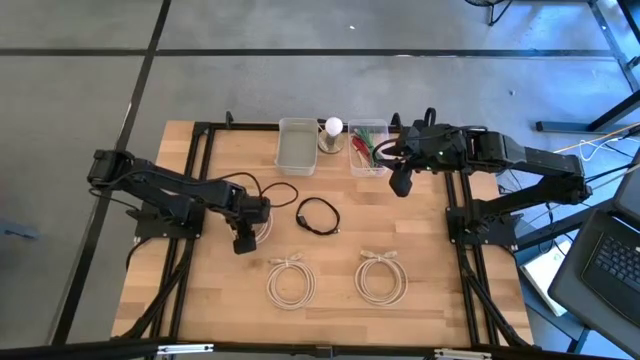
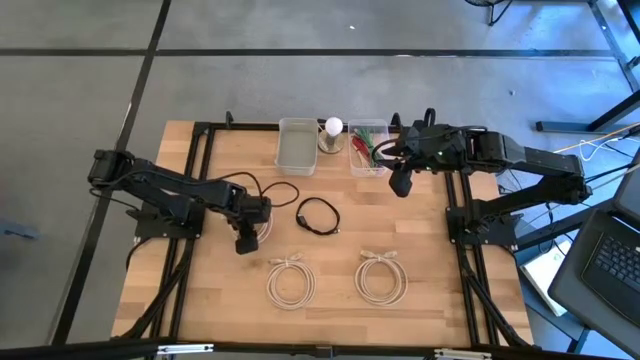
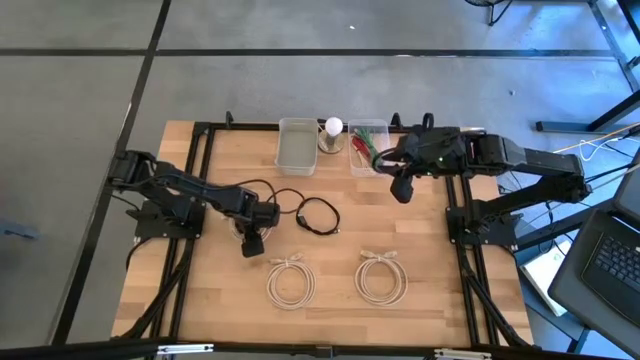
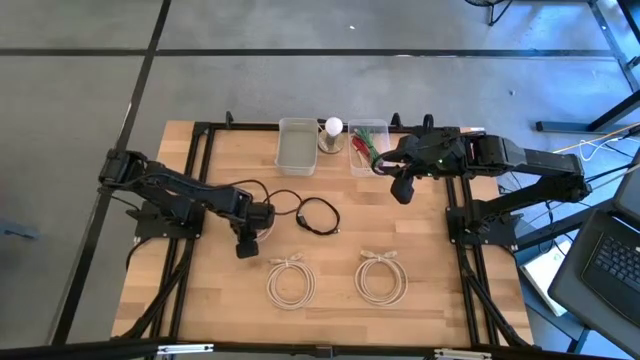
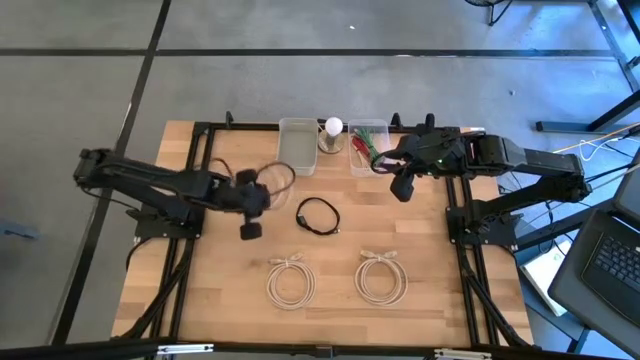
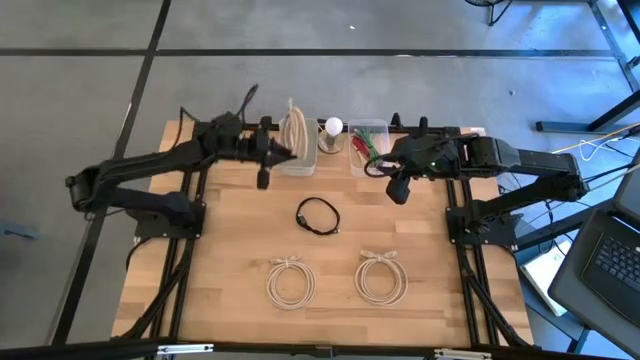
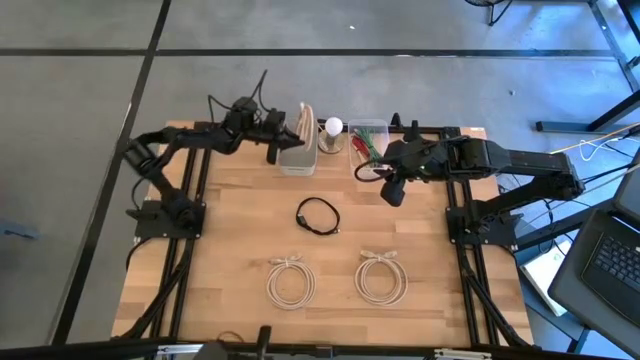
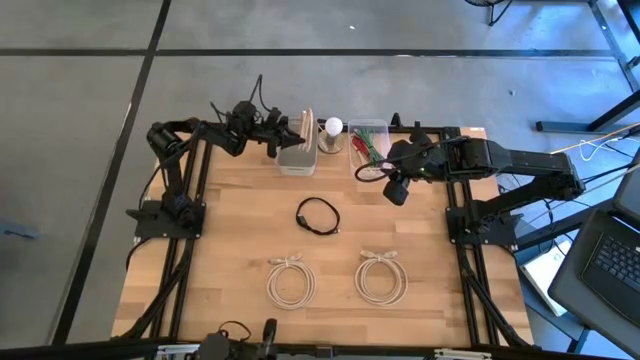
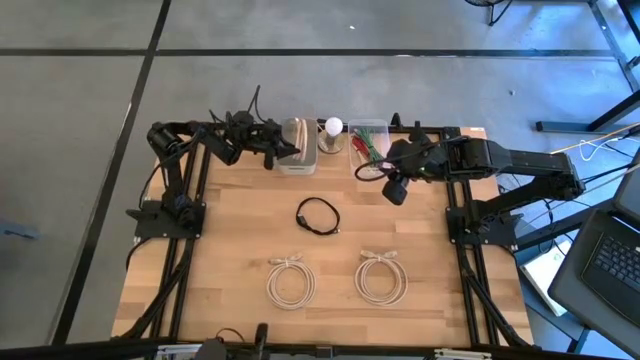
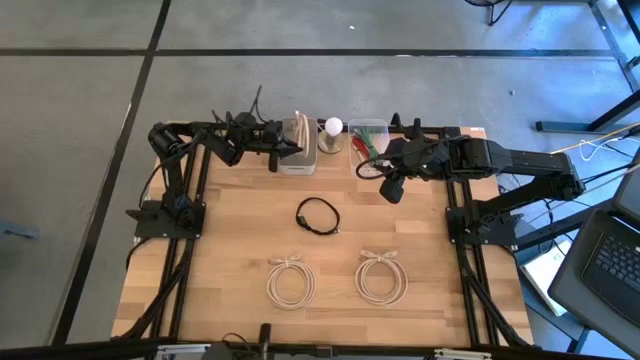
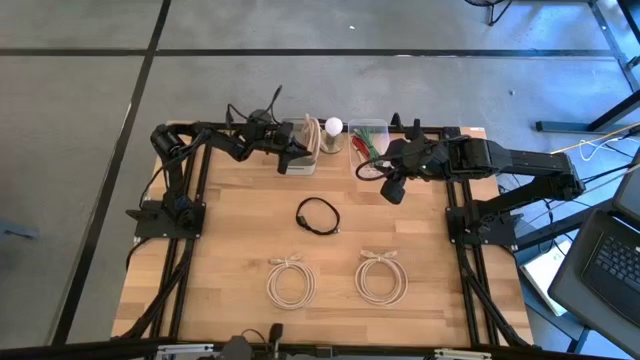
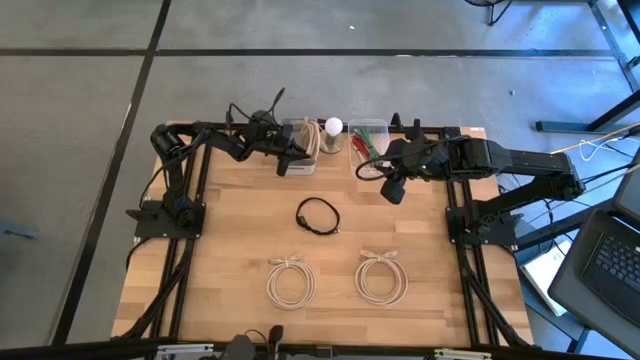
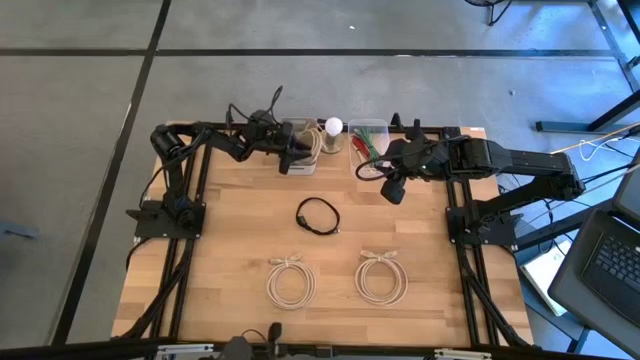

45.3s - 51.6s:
Put the top light brown HDMI cable into the gray bin

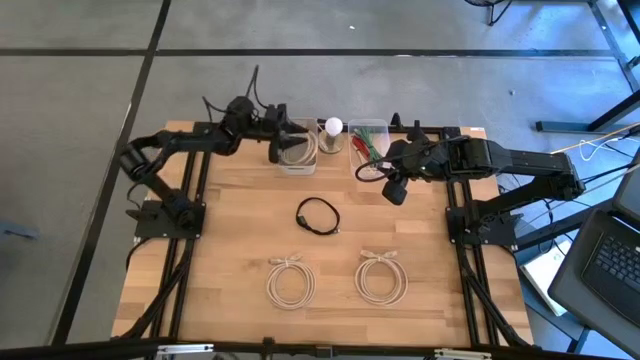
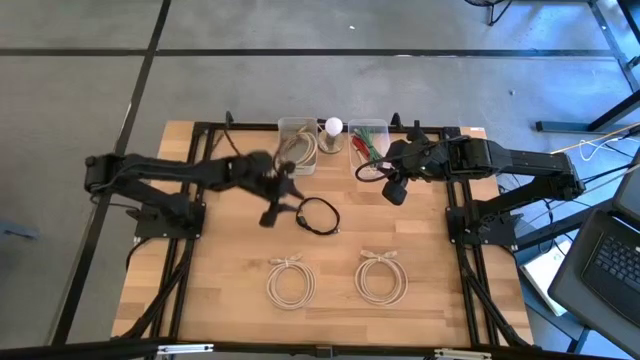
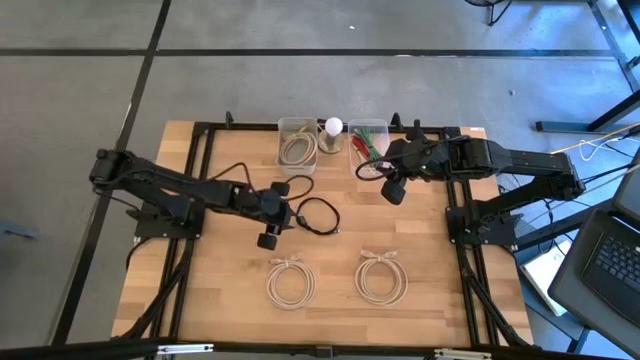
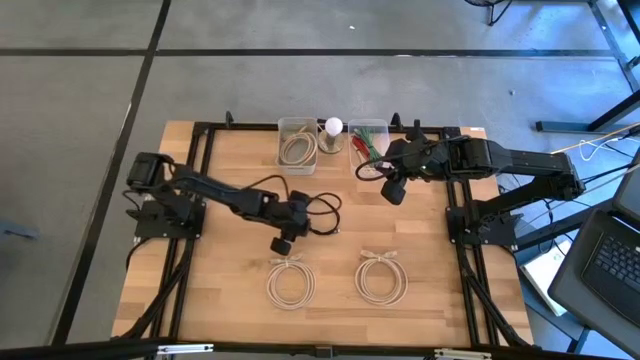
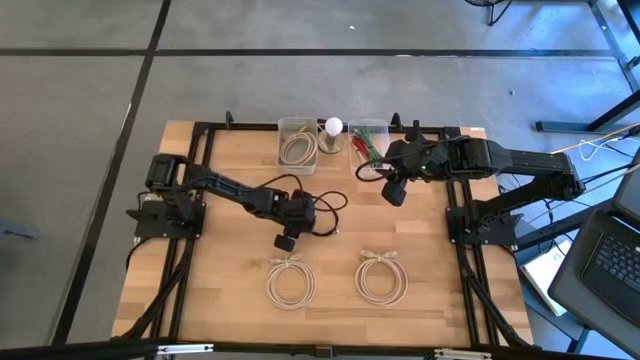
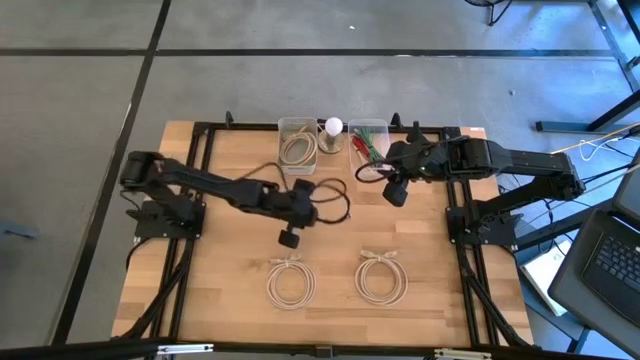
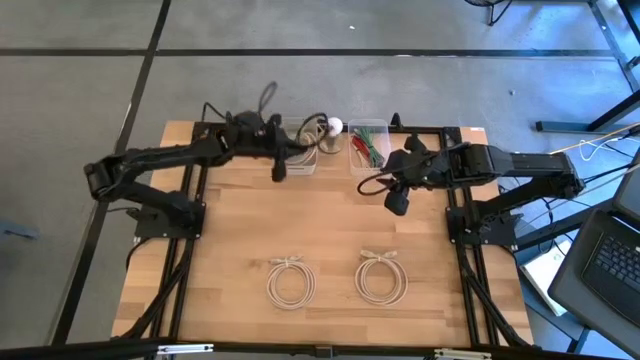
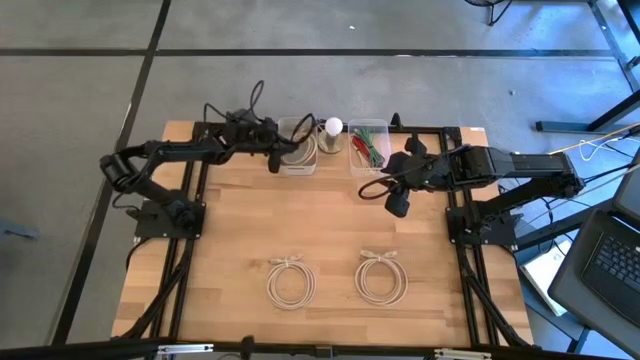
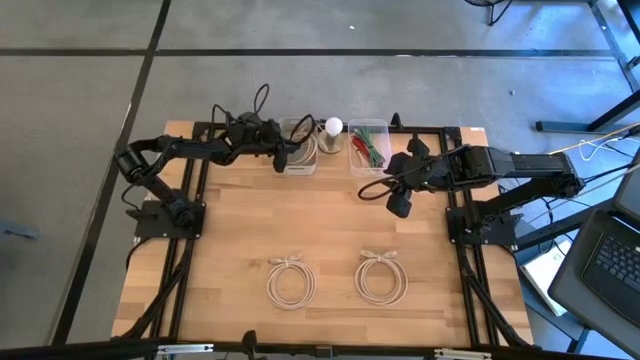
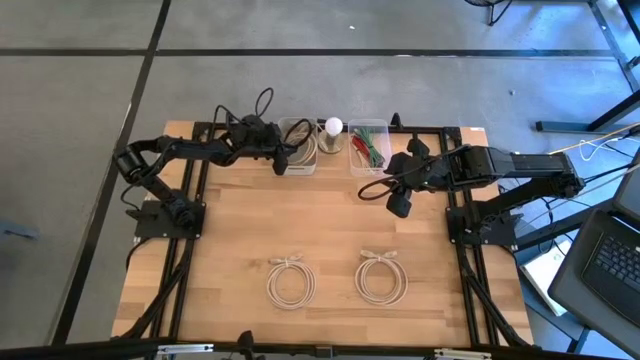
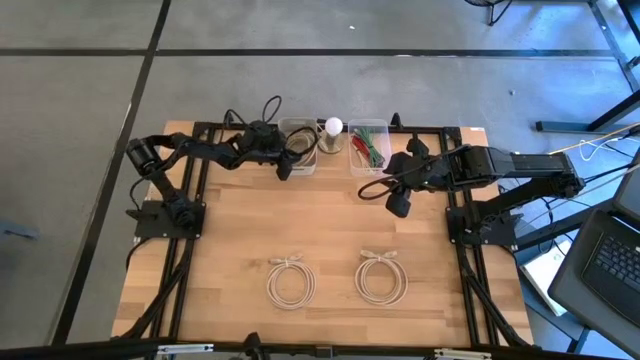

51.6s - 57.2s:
Put the black HDMI cable into the gray bin

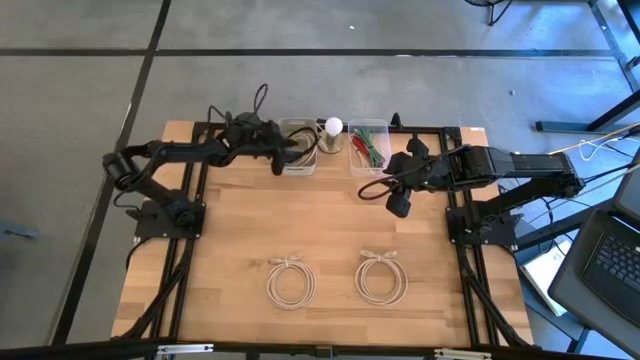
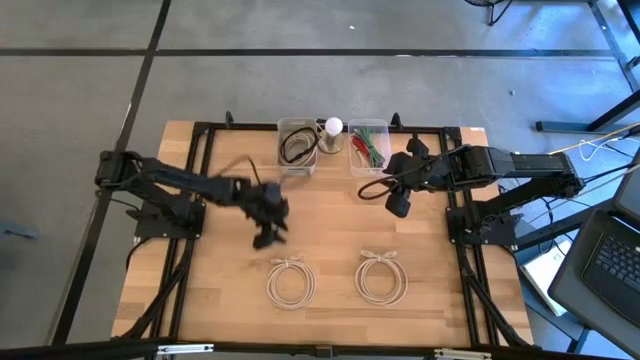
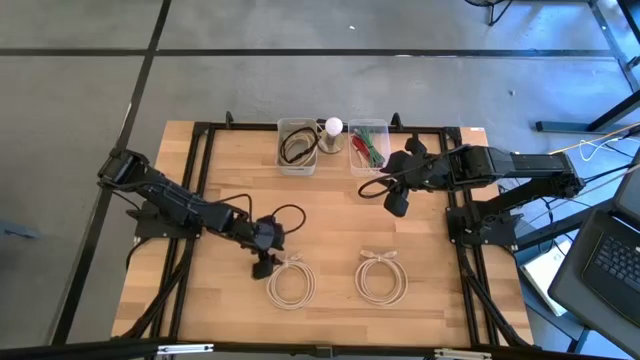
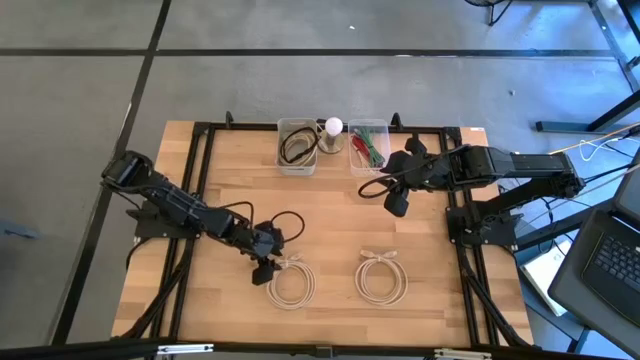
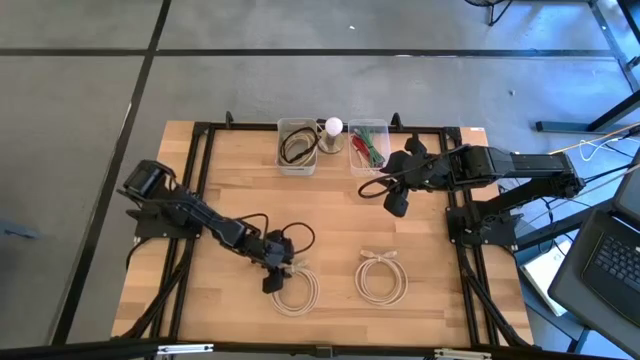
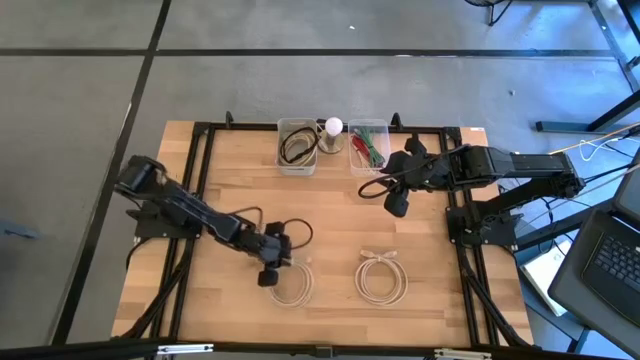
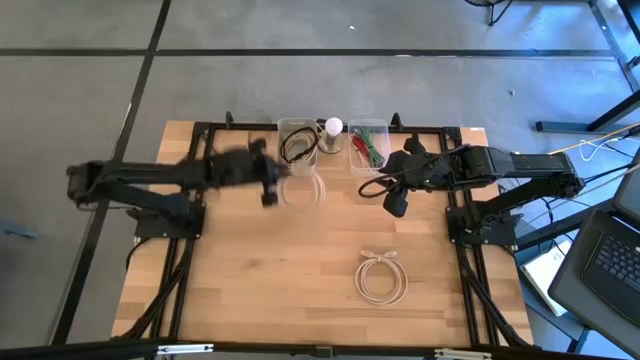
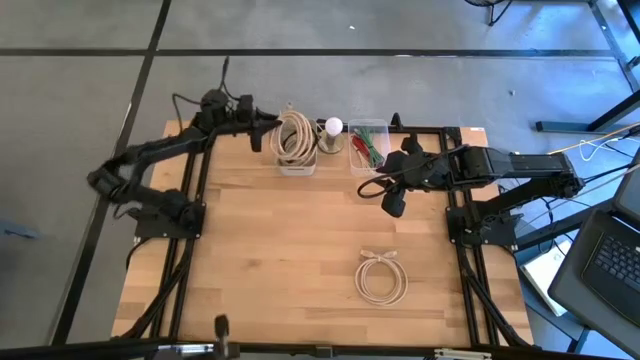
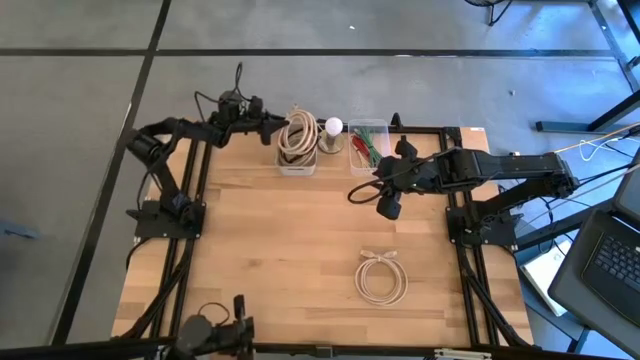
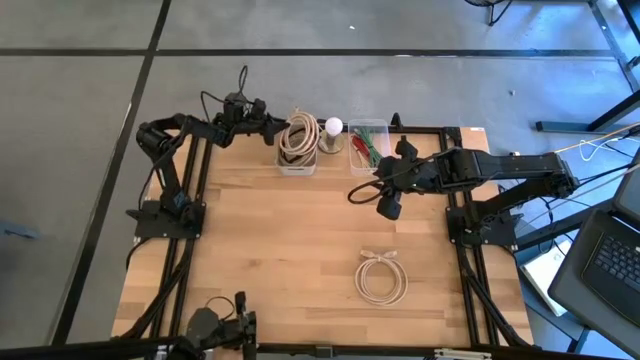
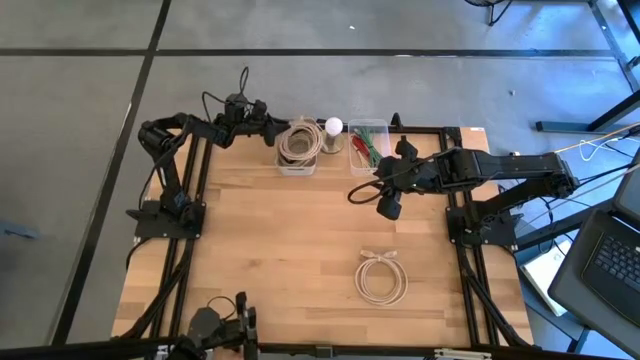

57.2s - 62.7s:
Put the left light brown HDMI cable into the gray bin

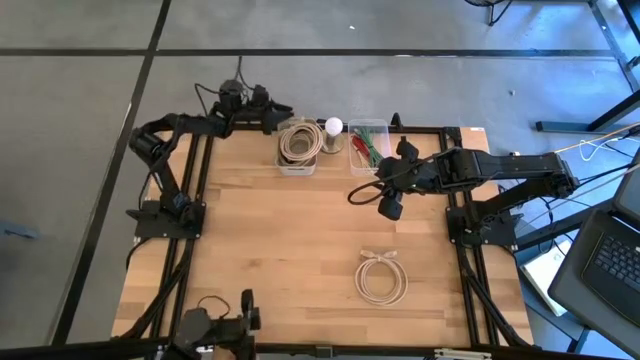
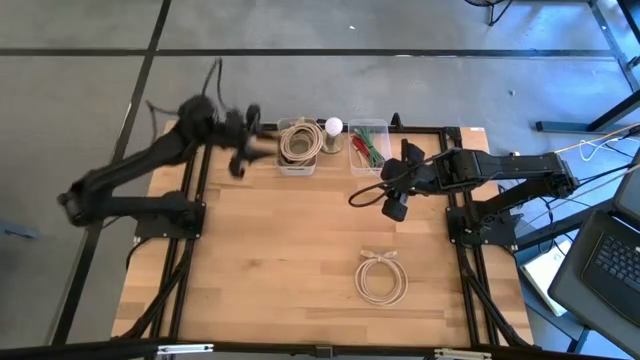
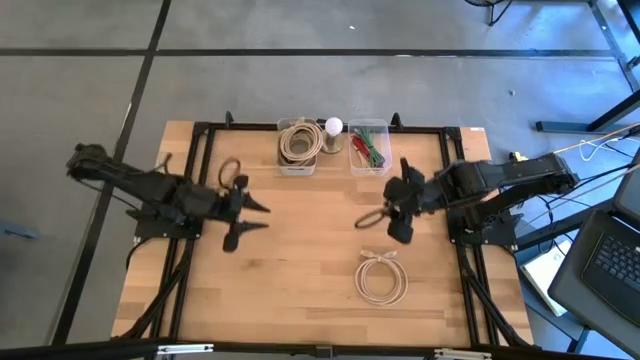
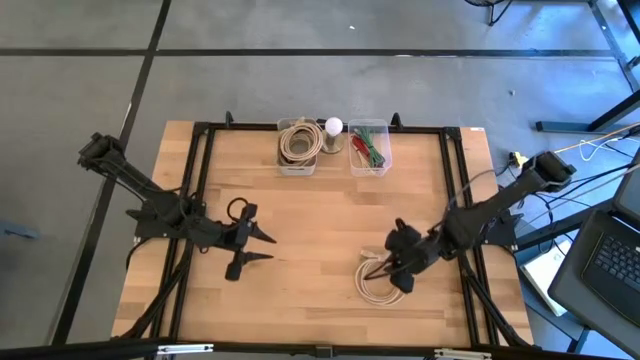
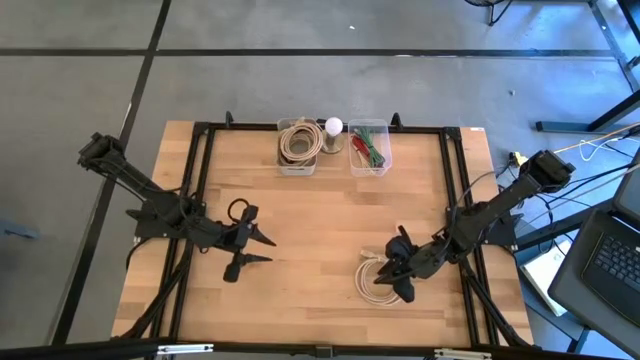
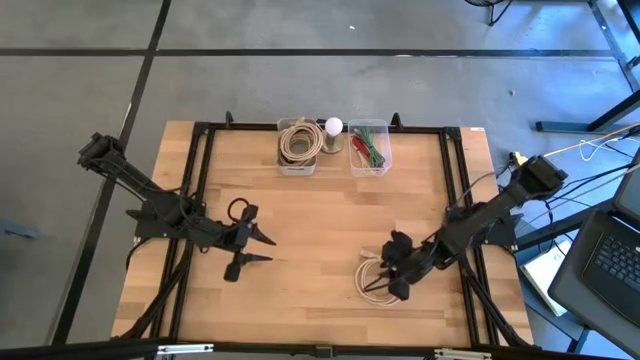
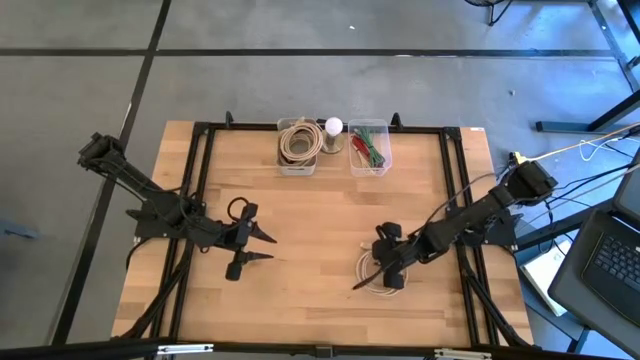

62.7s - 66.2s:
Put the light brown HDMI cable into the gray bin
